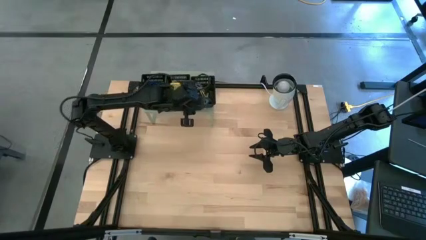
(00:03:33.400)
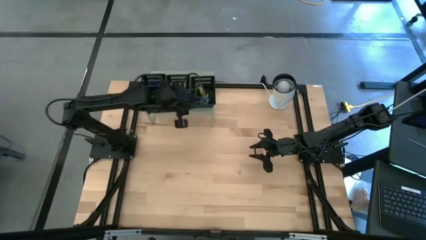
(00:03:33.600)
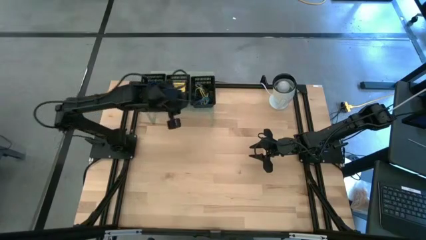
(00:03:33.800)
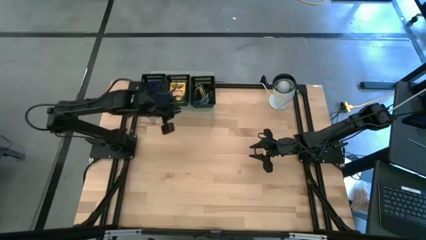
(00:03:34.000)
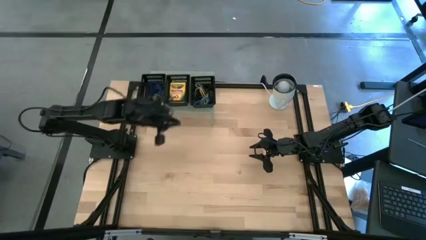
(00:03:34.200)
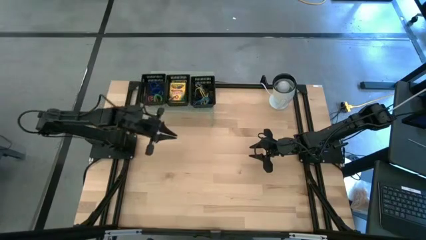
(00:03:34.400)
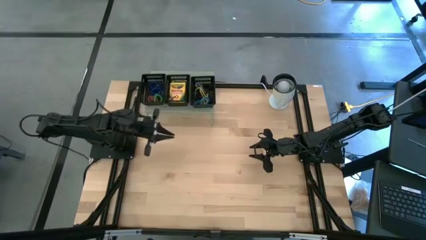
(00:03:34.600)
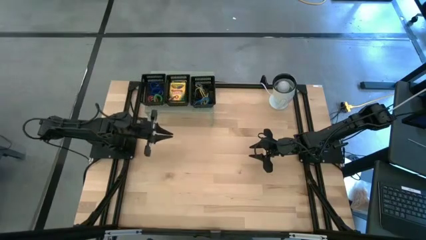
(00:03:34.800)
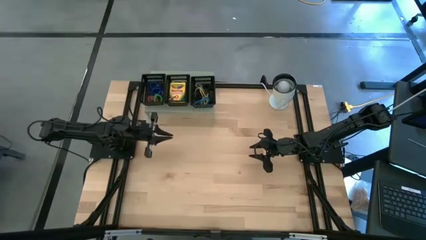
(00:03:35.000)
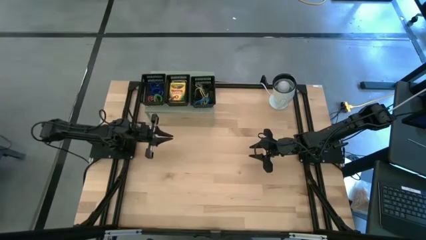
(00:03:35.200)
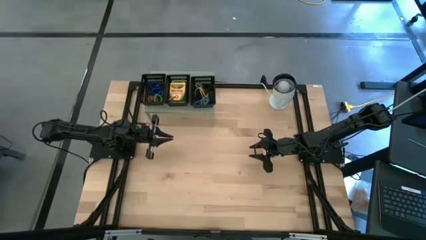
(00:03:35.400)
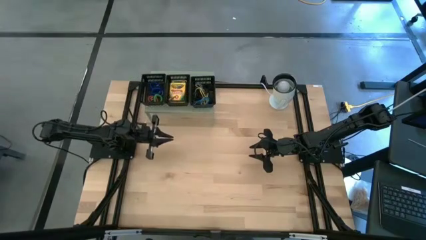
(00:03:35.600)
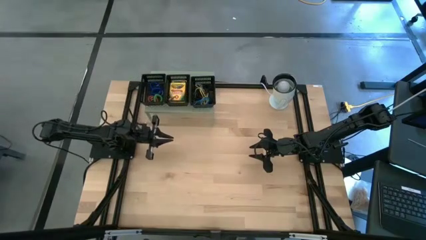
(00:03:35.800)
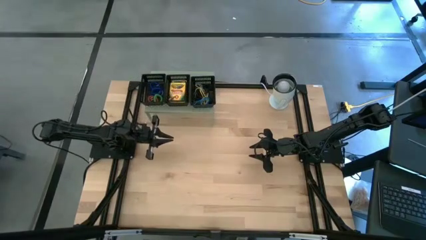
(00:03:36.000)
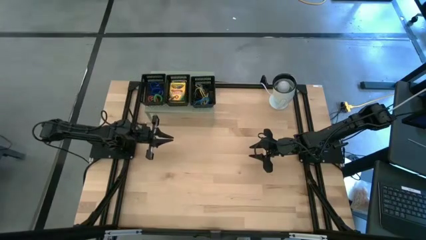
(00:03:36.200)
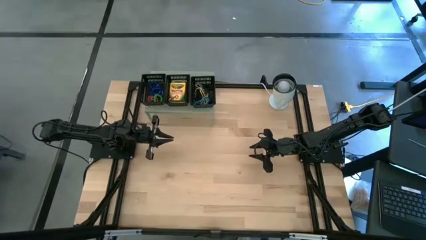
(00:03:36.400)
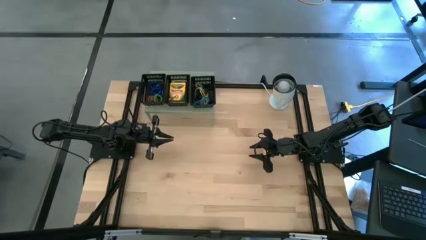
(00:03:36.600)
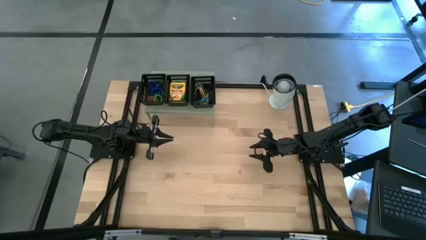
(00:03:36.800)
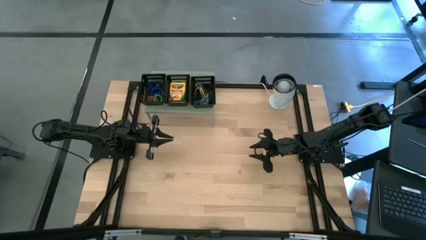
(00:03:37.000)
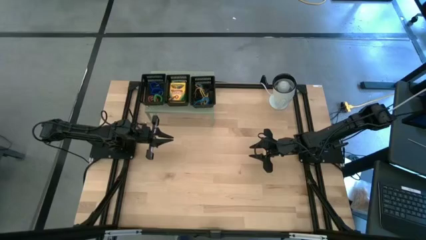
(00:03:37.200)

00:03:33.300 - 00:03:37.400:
Task: Pick & Place Office Desk Supplies
Return to Home Position

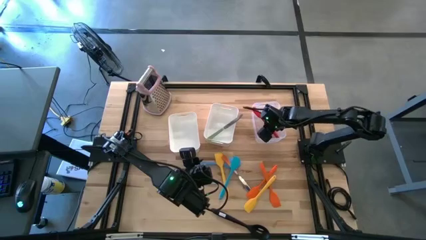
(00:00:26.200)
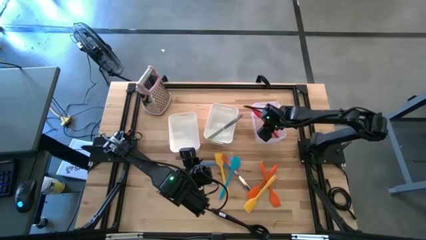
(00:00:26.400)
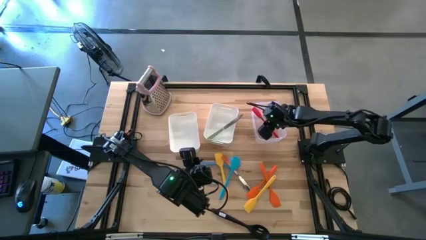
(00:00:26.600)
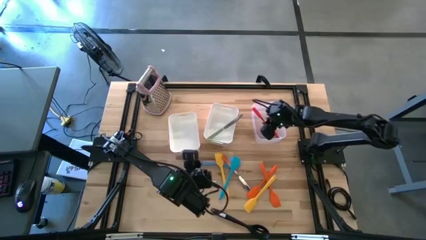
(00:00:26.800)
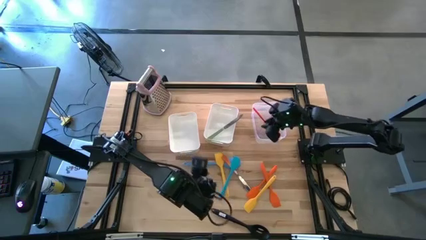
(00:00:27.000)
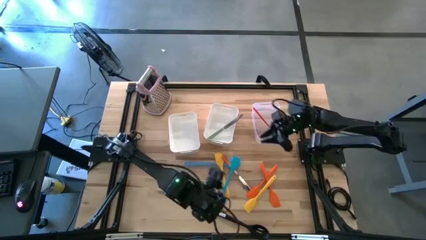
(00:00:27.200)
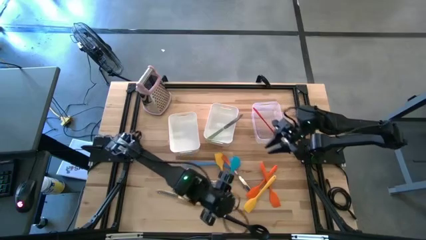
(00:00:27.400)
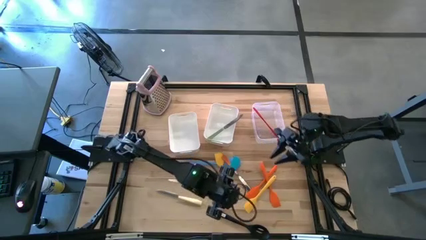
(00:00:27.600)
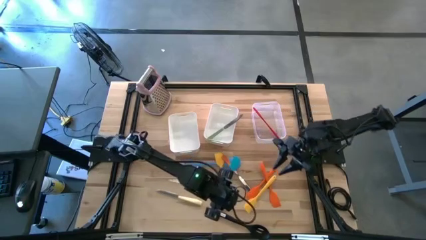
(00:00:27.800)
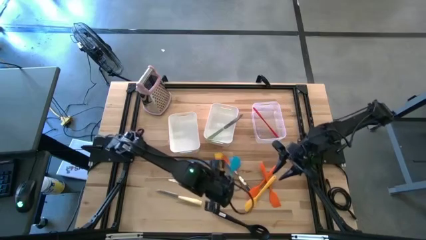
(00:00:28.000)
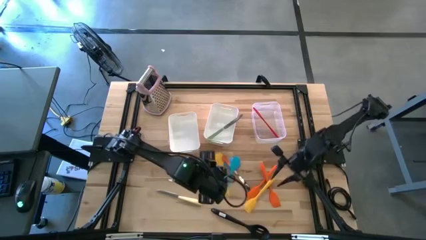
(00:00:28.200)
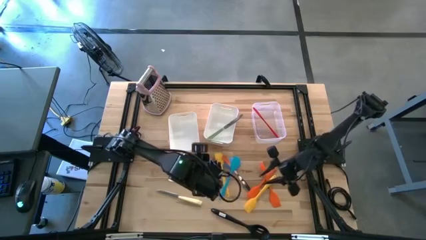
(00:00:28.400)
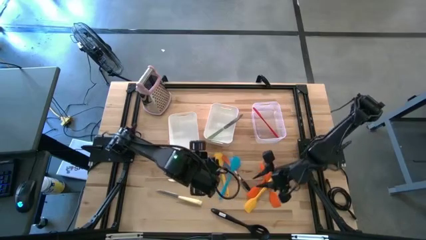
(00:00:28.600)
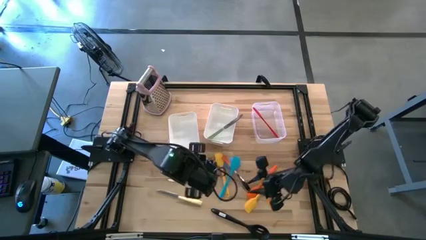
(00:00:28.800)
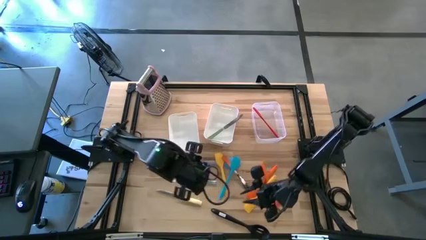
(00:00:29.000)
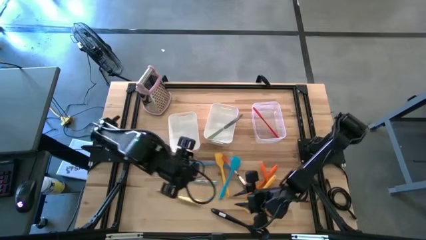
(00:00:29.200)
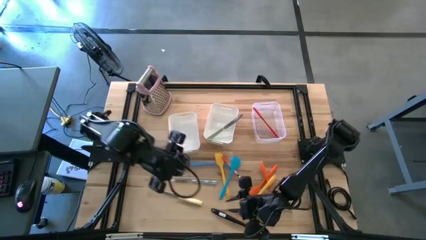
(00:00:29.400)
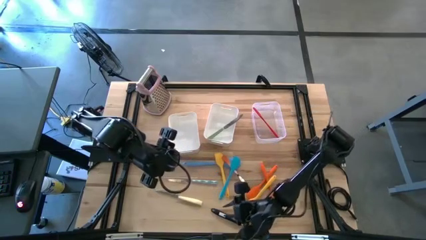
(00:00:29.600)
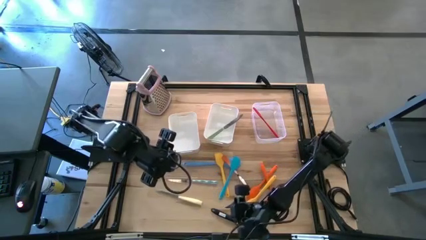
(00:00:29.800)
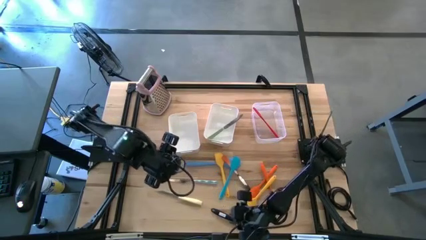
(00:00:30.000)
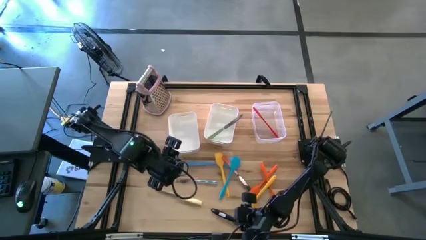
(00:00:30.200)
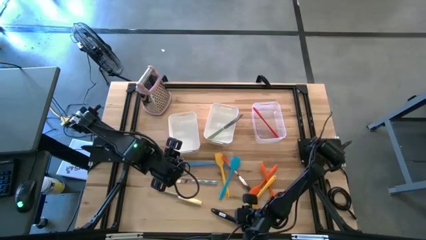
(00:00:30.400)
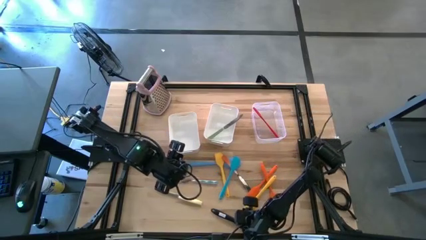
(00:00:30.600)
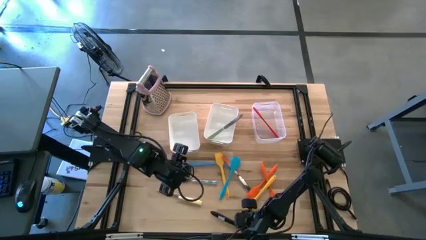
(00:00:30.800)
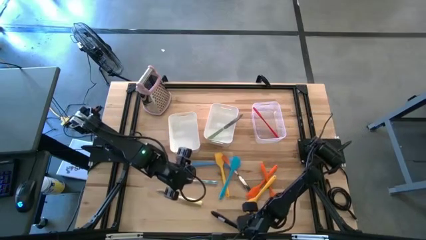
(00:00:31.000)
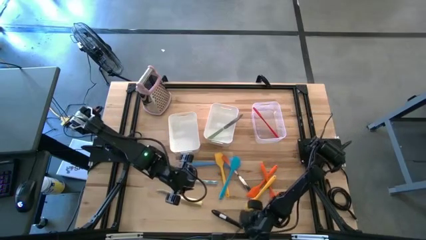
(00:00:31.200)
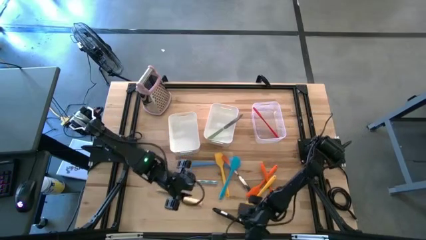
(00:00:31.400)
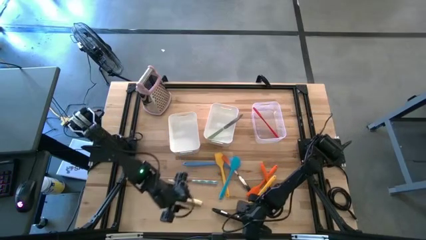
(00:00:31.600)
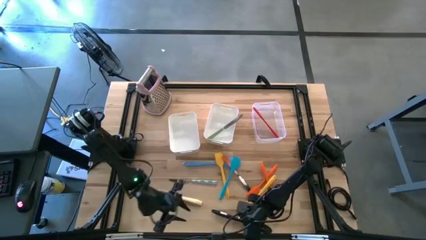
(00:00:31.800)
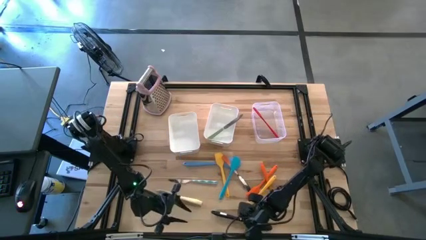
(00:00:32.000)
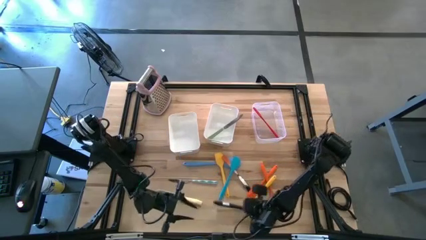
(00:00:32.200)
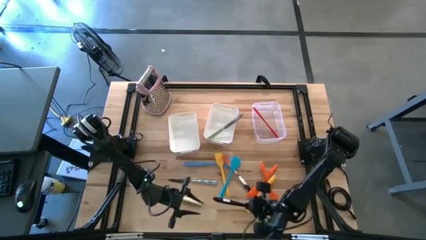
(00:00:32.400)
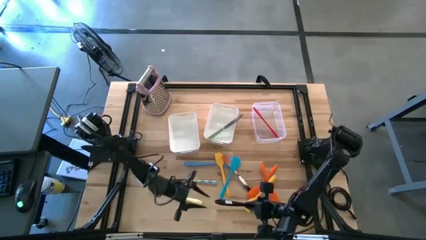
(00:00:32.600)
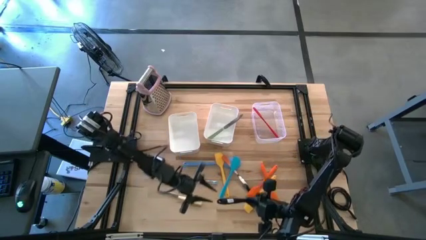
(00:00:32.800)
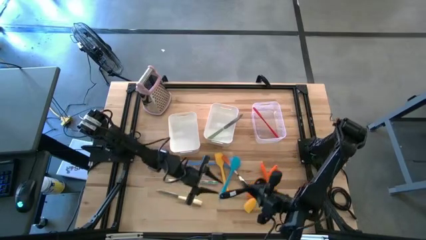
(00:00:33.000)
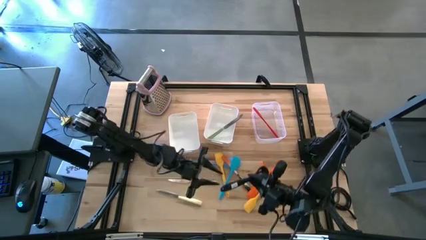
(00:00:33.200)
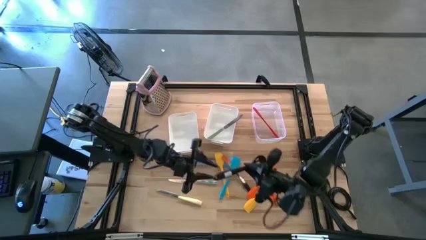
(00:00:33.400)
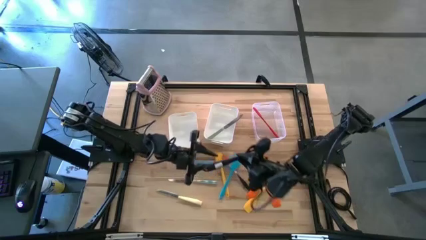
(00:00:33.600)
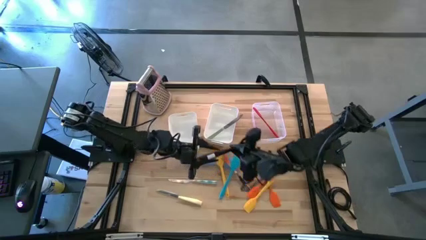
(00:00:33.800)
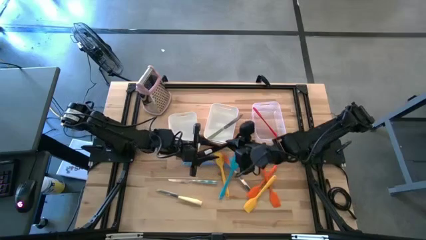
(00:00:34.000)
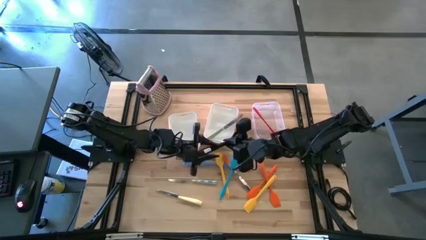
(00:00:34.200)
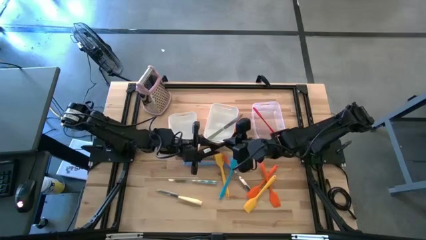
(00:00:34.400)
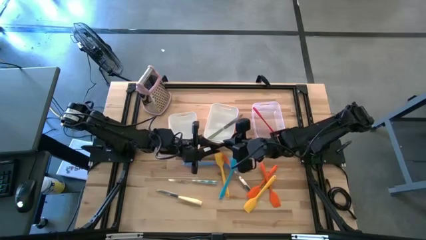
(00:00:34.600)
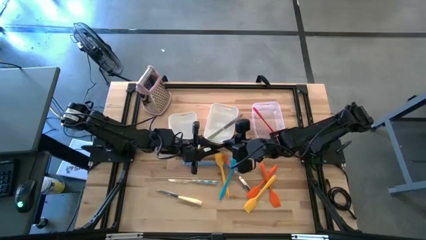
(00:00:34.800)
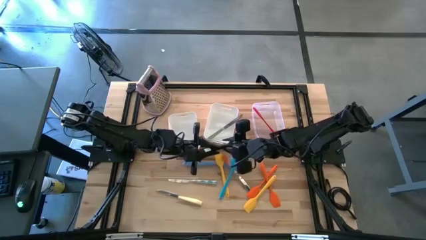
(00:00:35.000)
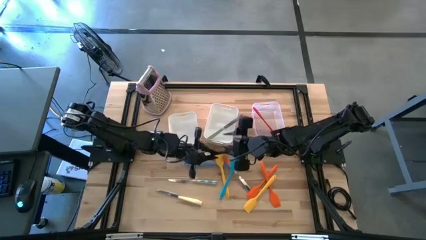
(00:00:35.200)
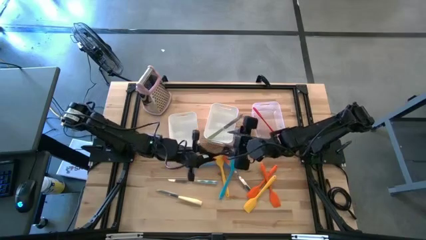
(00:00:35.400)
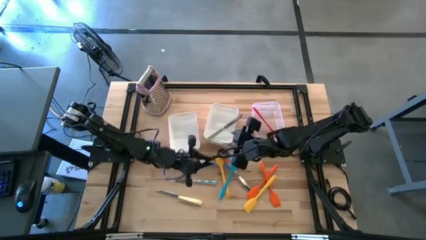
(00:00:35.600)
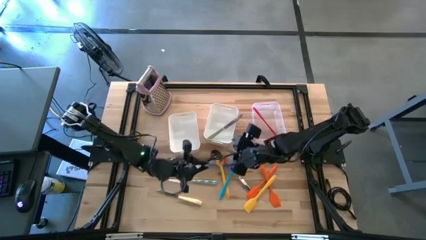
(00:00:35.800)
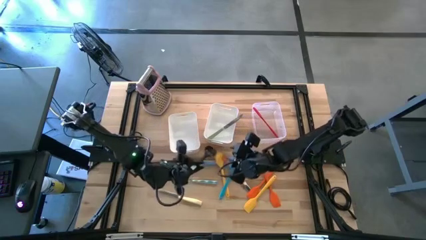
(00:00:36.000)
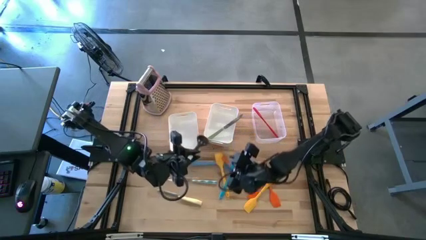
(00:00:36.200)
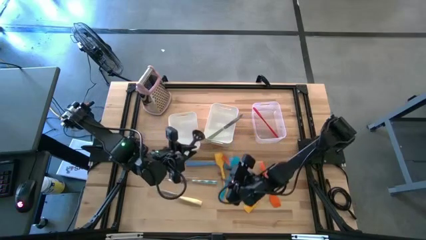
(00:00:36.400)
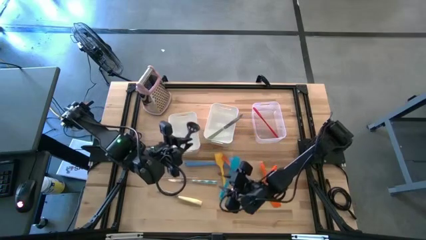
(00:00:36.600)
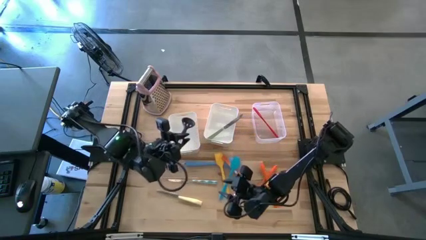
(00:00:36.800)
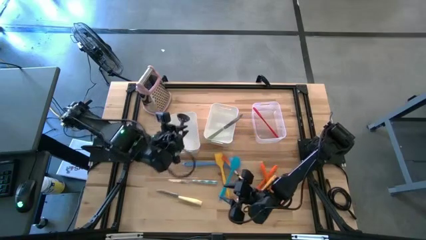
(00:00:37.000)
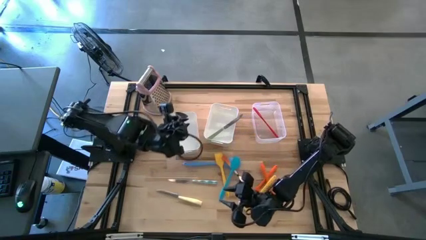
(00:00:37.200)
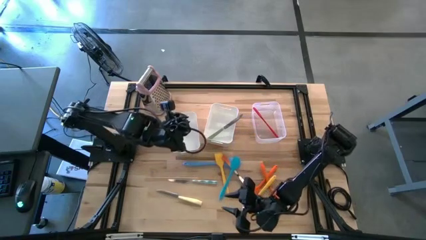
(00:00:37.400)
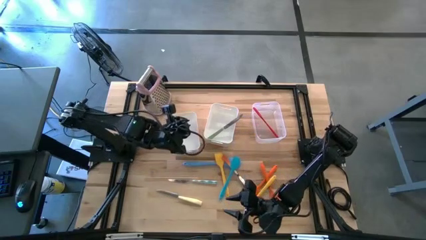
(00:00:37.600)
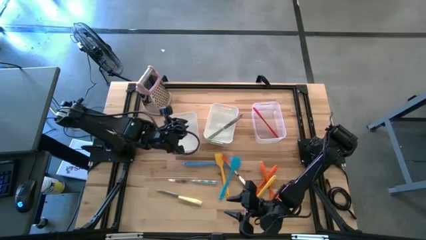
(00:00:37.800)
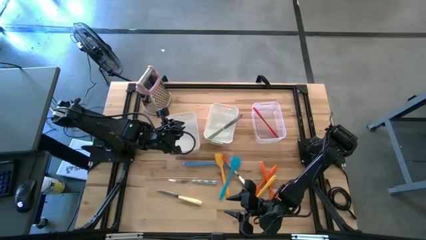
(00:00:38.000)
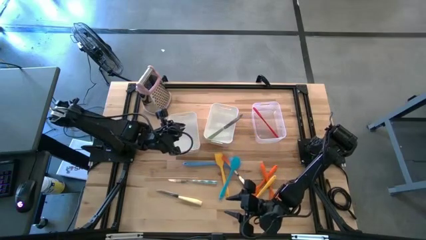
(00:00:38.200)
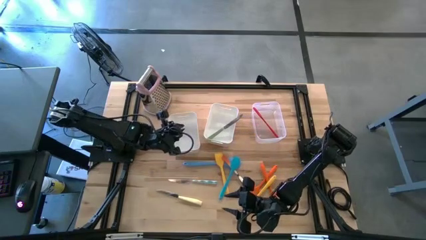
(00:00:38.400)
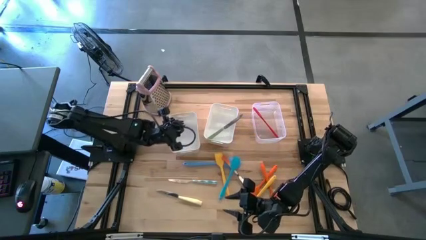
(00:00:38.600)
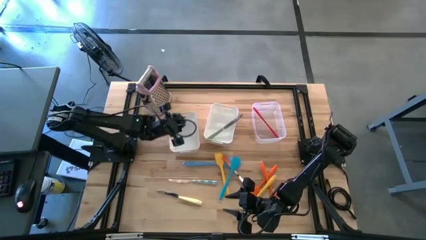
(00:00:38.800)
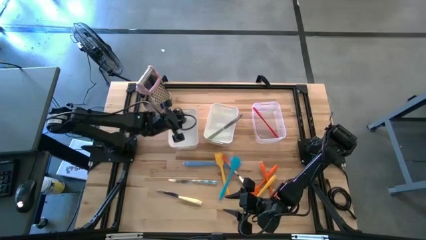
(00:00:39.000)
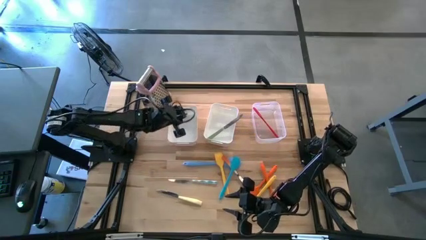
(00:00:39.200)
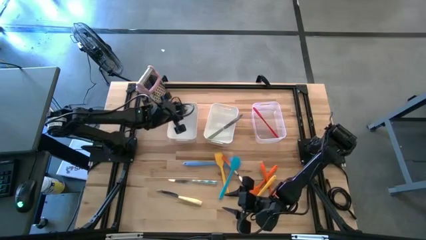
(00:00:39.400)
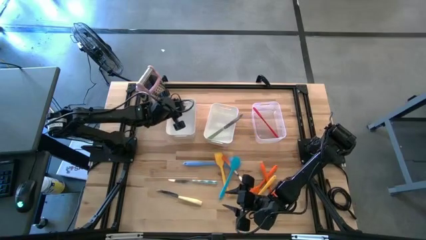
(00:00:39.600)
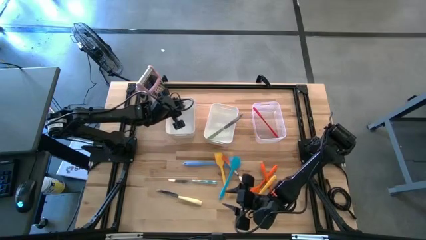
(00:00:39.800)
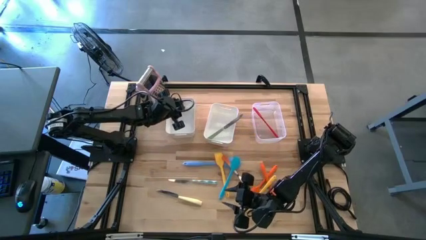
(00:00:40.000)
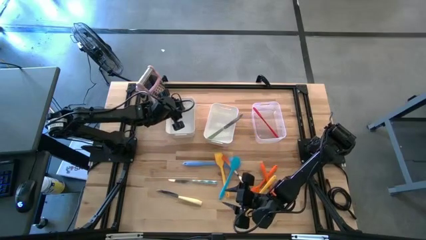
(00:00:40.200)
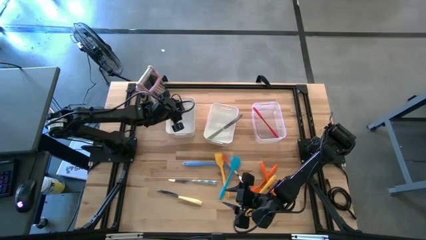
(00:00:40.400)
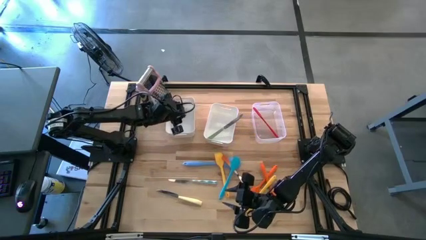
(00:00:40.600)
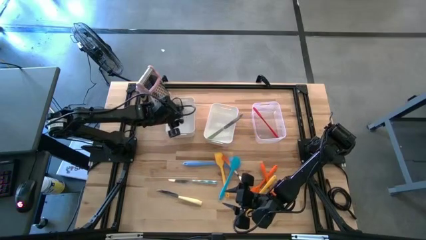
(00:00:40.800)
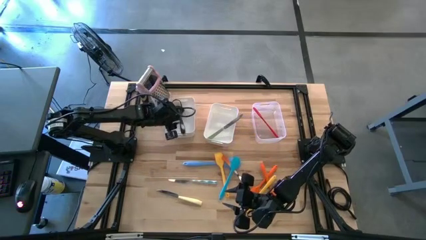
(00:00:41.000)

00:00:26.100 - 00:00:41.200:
Task: Pick & Place Kitchen Items
Put the black serving spoon into the left white bin
